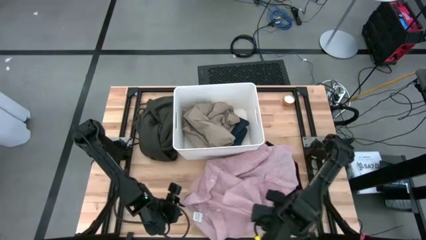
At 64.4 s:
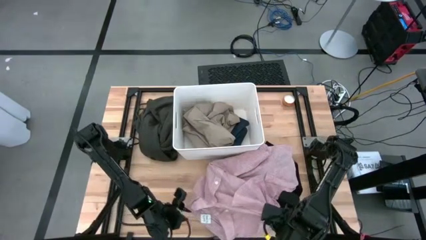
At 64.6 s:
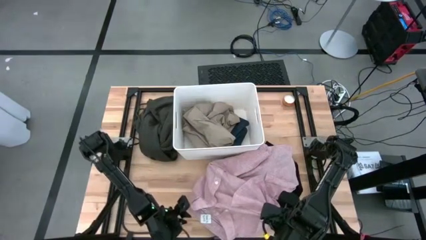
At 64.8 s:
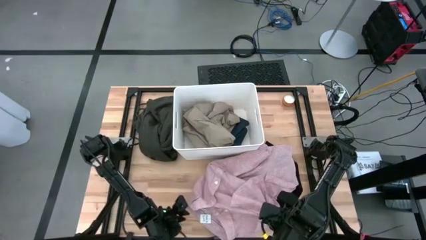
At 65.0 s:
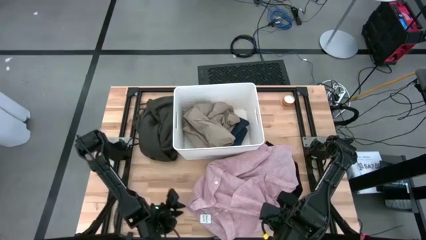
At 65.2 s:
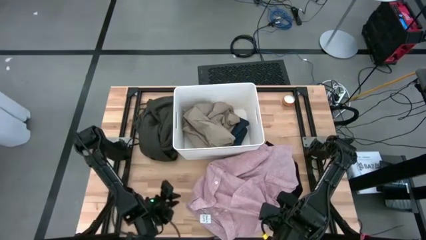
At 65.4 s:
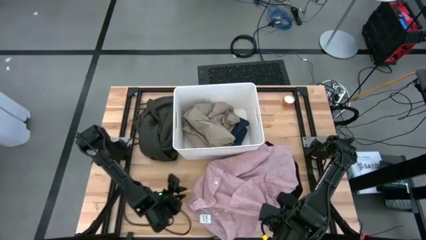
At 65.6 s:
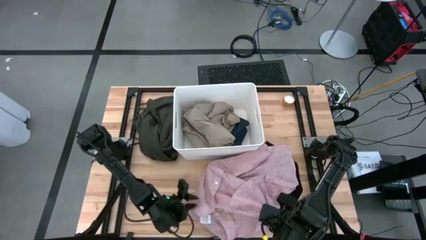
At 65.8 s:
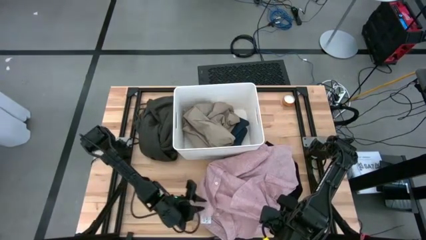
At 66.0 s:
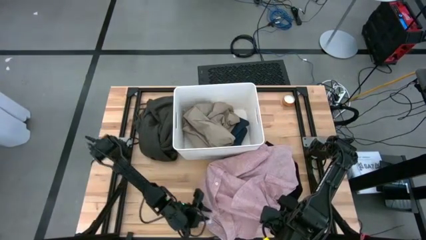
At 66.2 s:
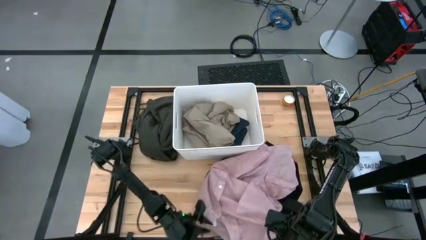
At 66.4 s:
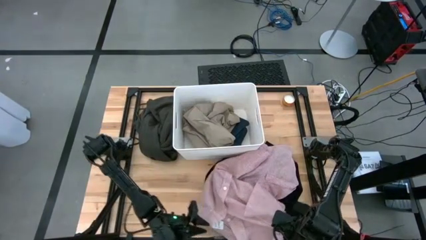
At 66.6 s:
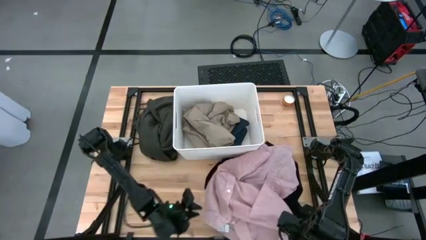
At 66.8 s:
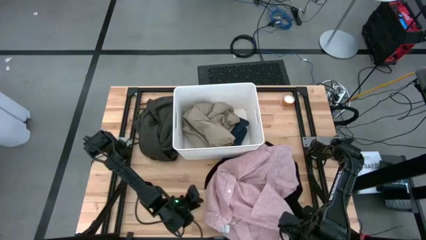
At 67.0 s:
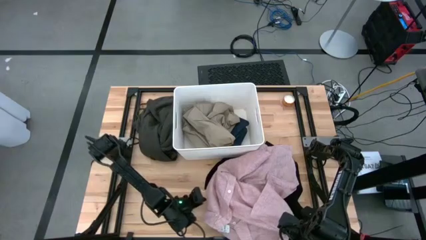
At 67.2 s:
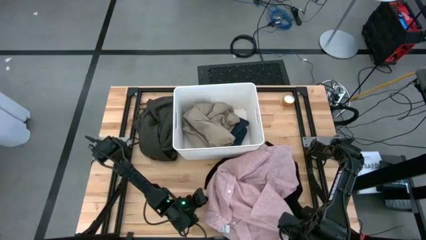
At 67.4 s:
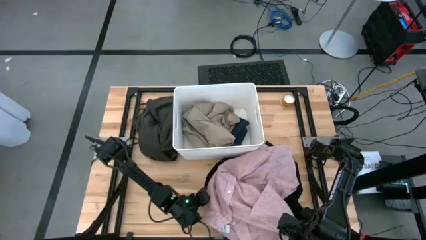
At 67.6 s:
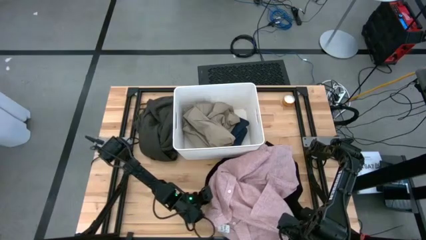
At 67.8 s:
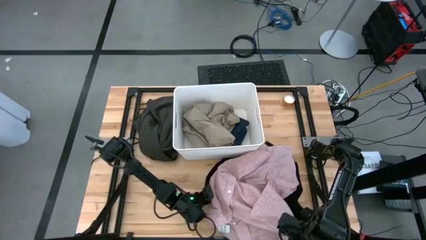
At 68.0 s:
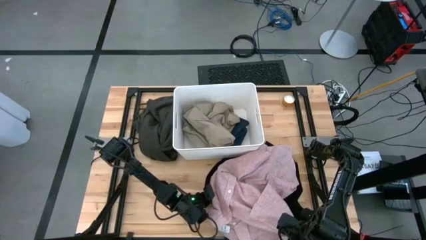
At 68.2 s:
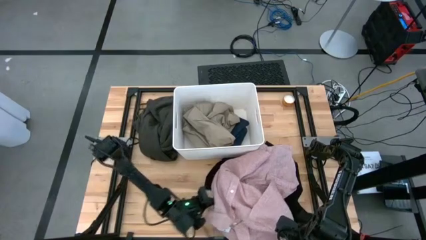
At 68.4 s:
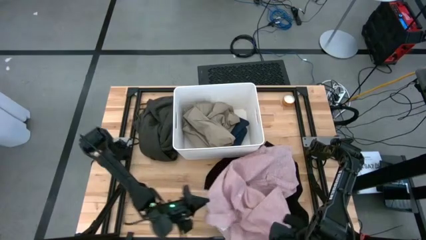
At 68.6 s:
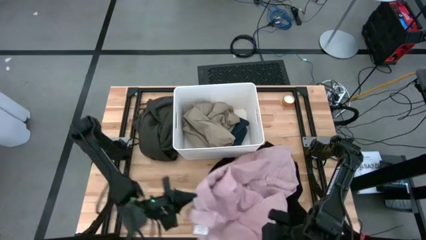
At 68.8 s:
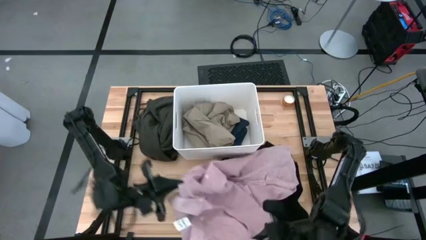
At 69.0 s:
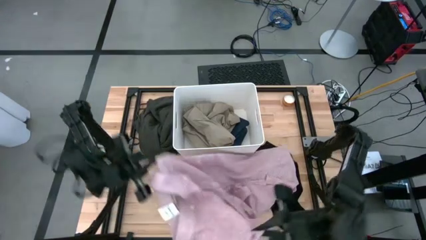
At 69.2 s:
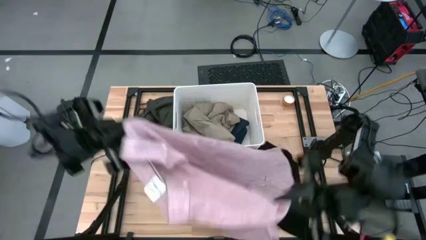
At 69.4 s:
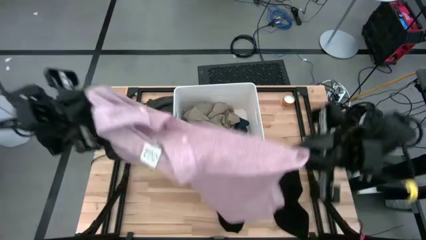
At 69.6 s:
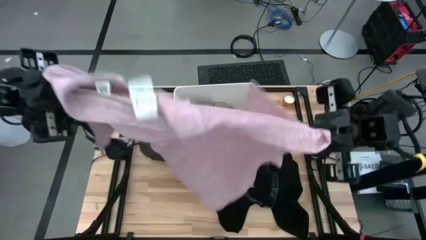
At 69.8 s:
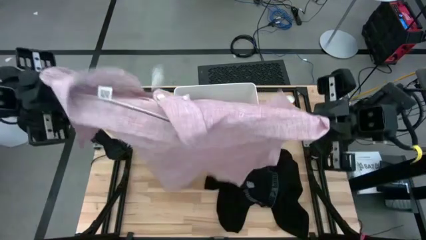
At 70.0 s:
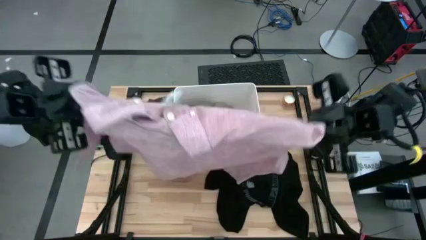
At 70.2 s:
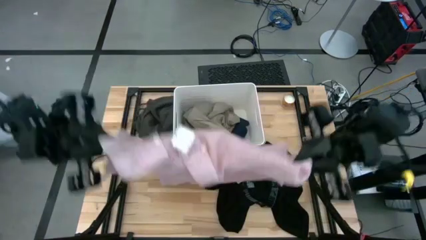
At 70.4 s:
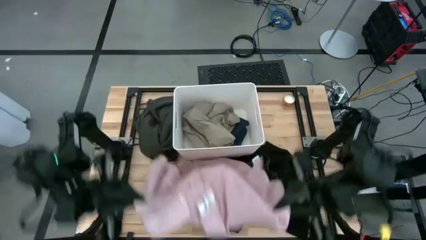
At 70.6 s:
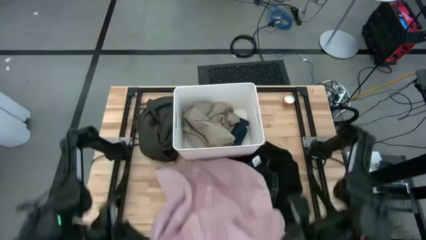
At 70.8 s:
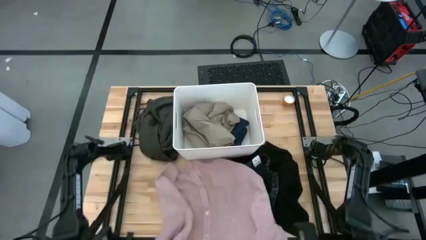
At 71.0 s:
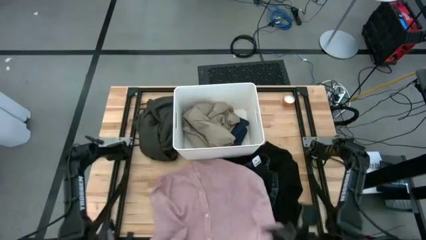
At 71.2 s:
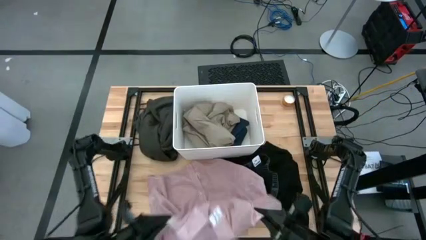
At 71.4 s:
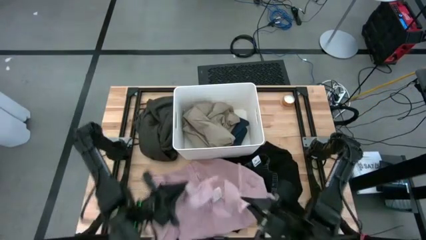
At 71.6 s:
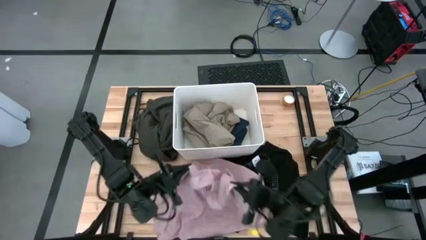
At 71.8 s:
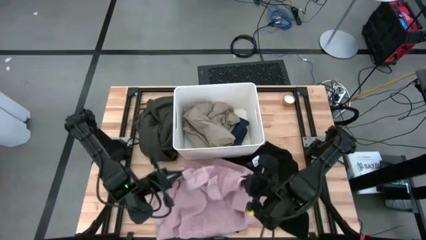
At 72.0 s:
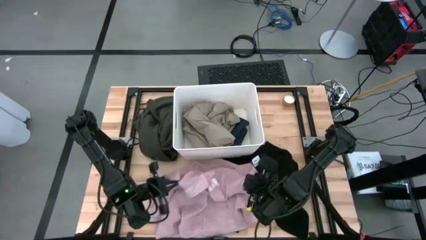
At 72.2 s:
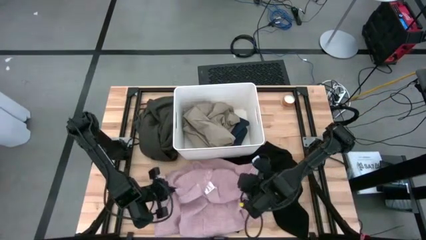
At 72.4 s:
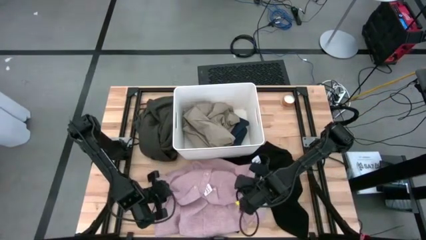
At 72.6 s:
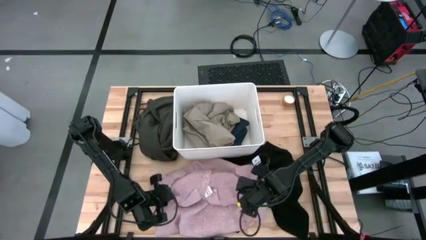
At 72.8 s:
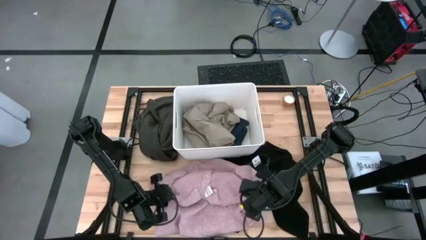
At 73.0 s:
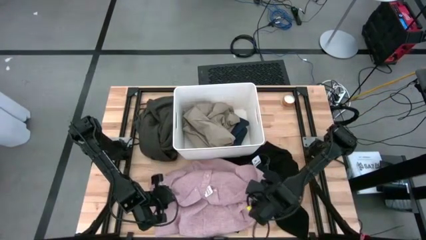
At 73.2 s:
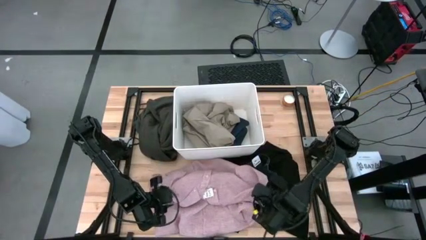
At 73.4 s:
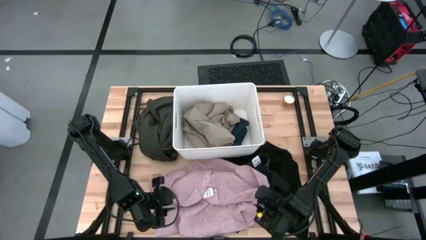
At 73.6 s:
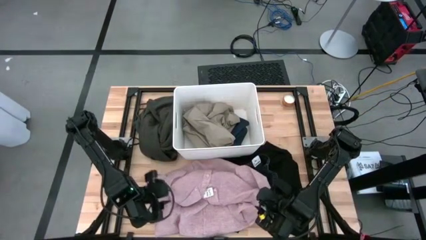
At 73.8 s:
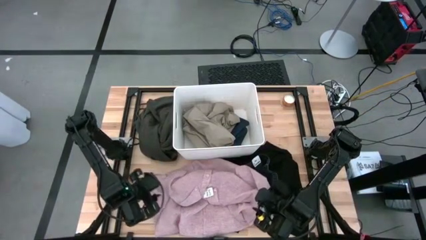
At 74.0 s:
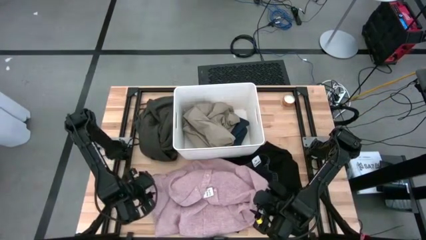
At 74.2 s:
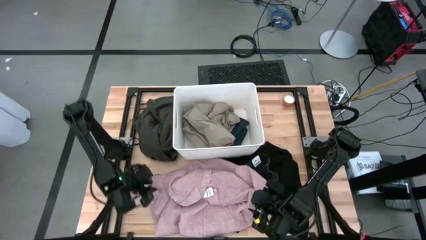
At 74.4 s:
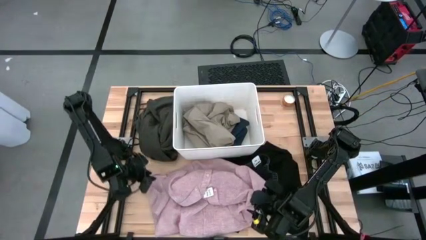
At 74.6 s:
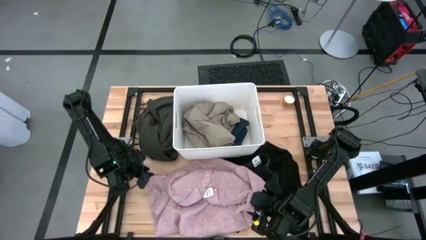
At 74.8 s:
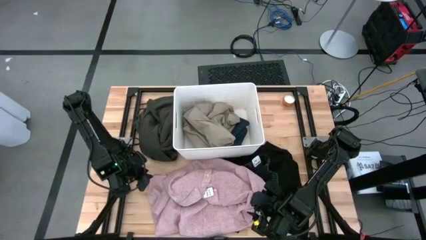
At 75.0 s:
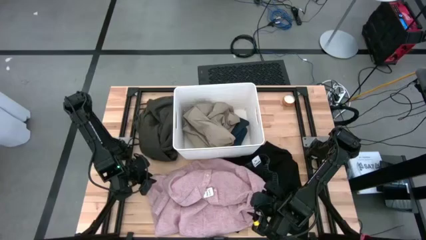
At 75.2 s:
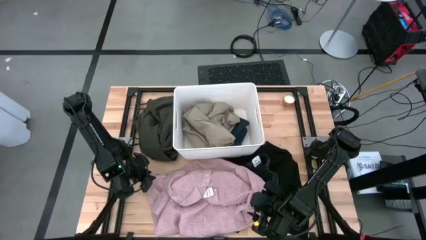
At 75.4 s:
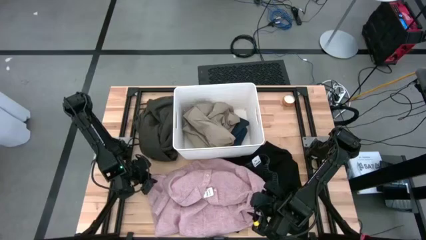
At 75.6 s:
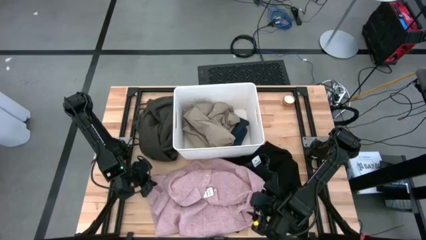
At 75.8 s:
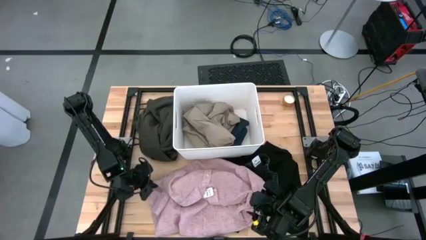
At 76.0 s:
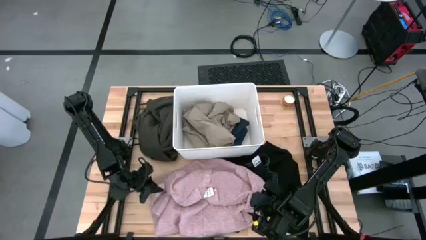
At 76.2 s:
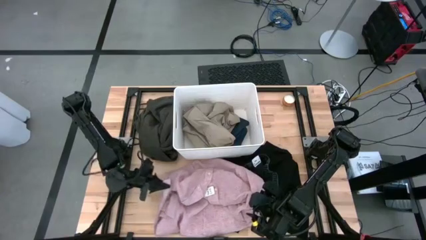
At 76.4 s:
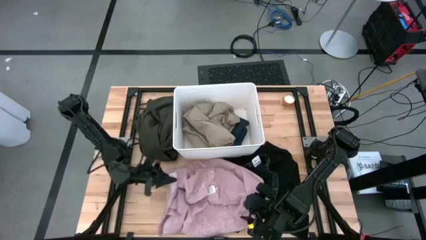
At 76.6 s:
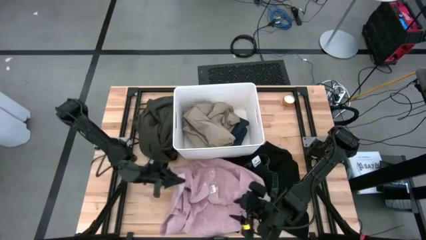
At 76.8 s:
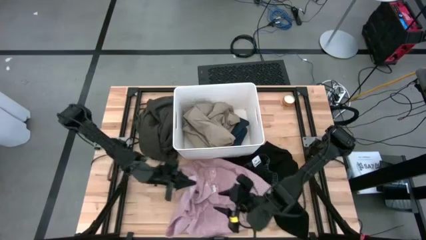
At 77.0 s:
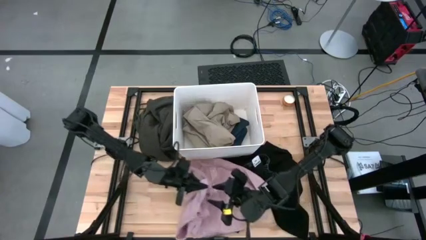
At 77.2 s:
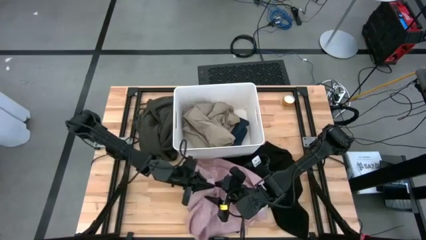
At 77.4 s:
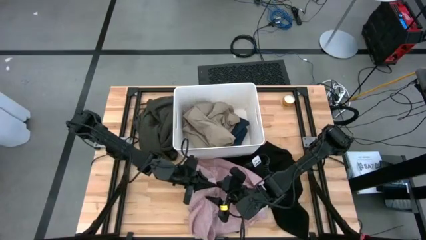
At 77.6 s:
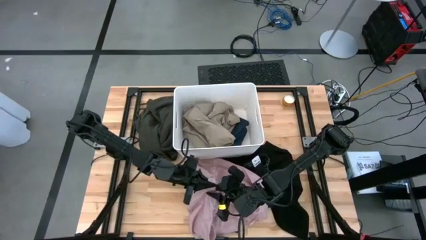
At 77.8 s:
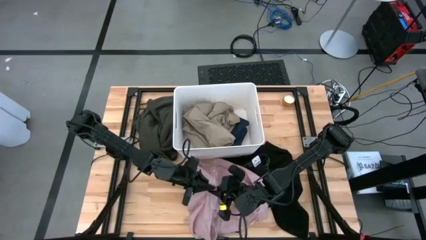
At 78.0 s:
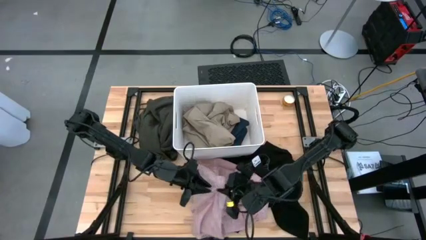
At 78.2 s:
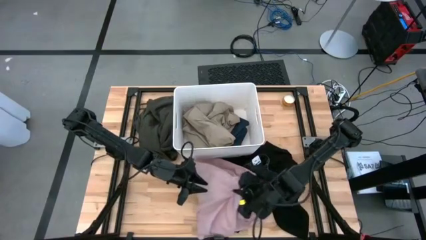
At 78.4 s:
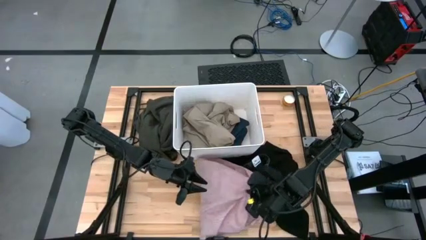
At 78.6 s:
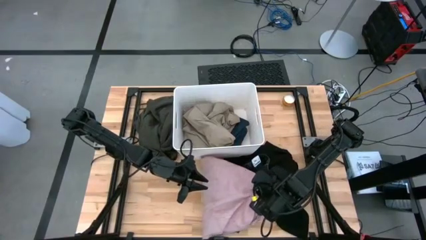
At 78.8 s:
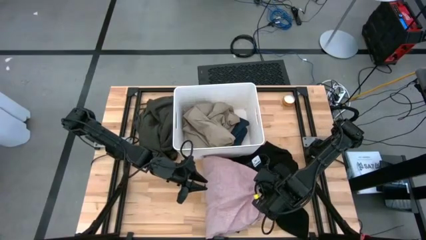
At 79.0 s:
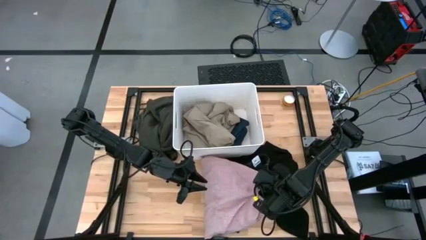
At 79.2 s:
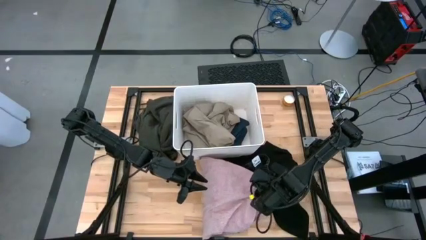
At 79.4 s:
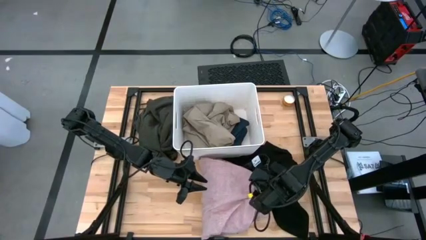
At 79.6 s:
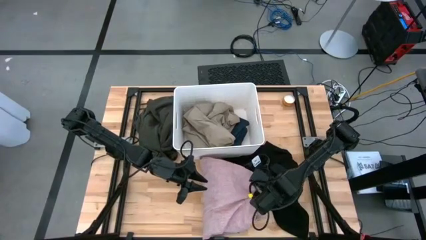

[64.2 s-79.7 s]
Task: Sort clothes
Fold the pink shirt

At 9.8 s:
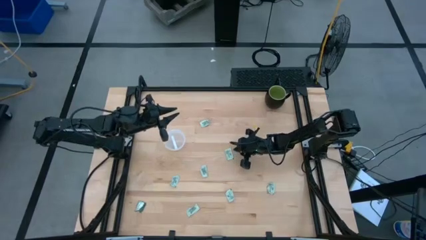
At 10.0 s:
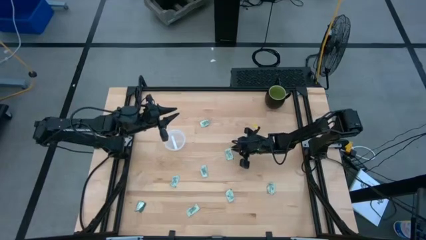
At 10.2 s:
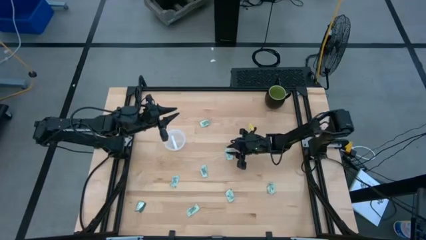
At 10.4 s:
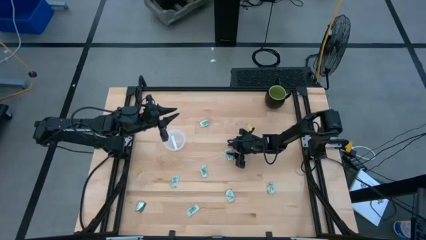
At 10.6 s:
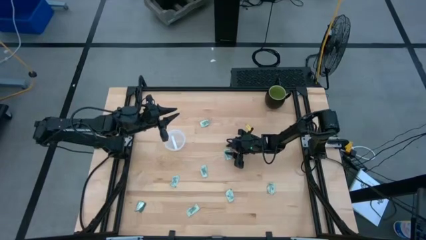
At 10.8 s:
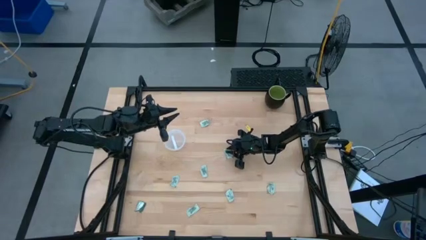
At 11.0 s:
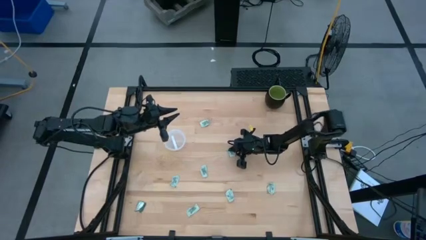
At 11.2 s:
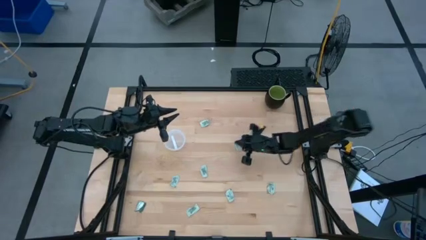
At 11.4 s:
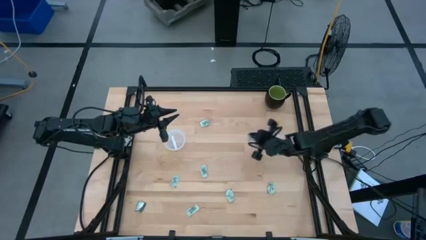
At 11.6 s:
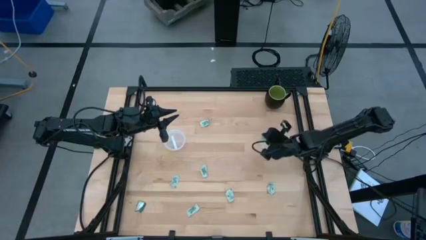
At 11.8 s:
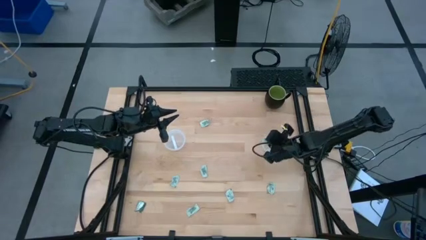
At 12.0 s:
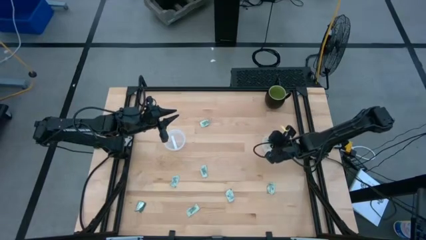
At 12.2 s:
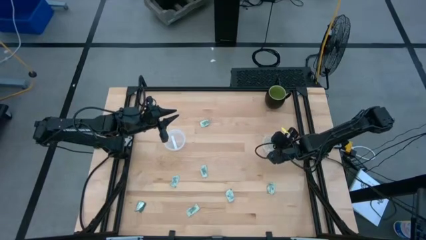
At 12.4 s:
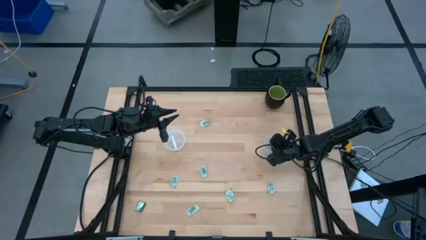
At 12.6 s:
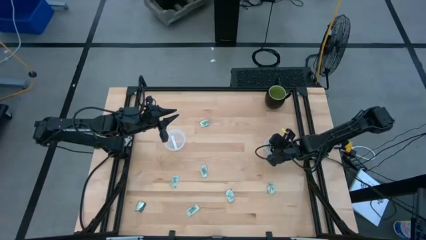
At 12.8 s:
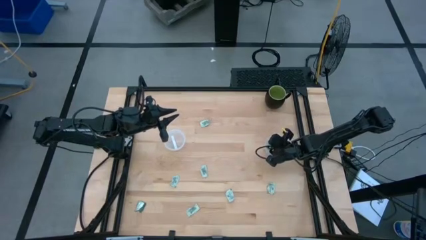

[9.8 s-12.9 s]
Task: Pick and place items into bin
Put the stevia packet into the right transparent bin
